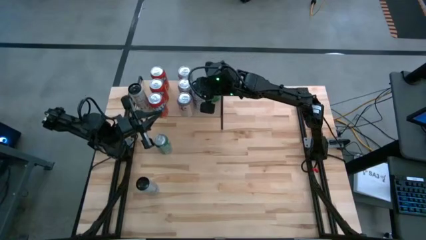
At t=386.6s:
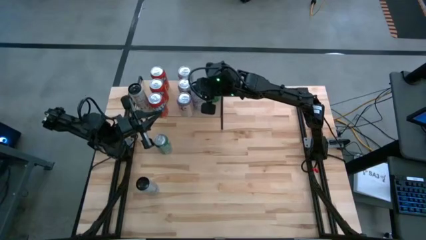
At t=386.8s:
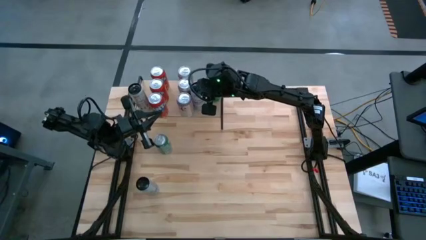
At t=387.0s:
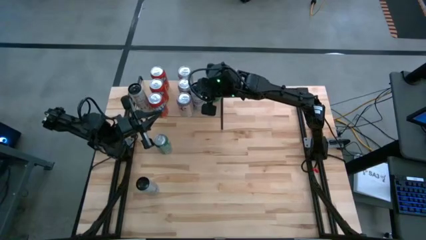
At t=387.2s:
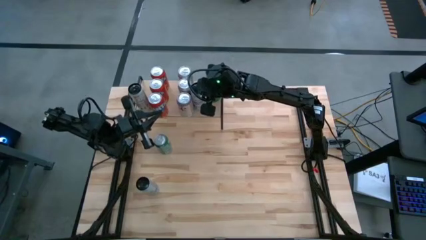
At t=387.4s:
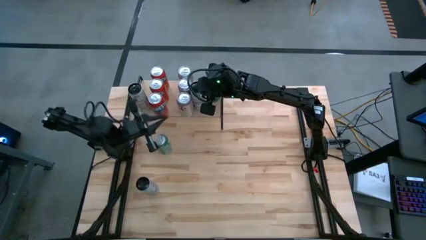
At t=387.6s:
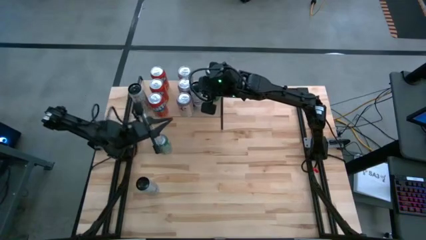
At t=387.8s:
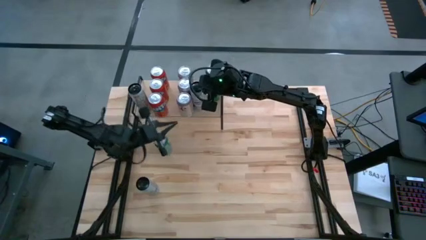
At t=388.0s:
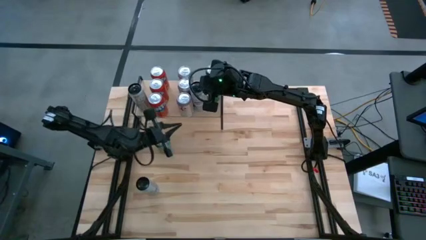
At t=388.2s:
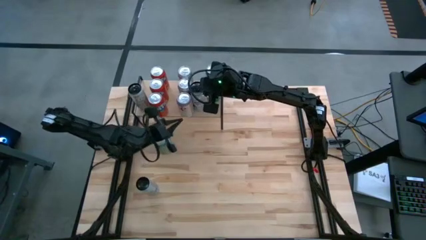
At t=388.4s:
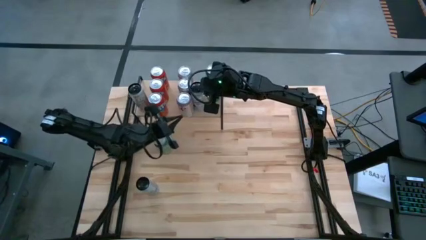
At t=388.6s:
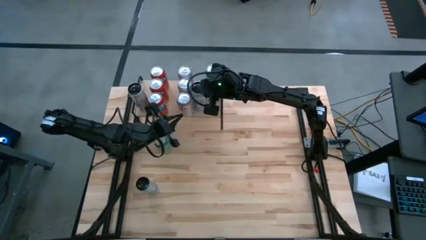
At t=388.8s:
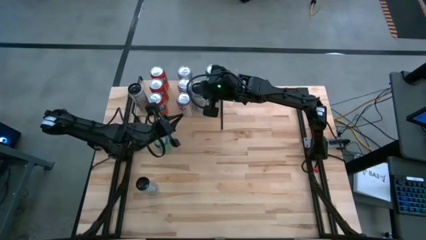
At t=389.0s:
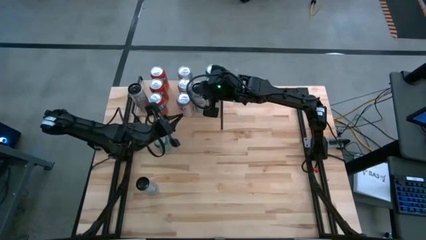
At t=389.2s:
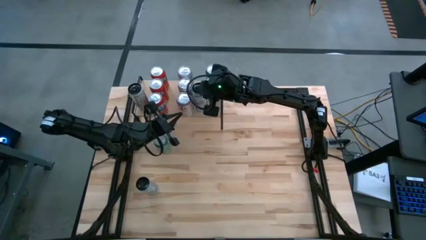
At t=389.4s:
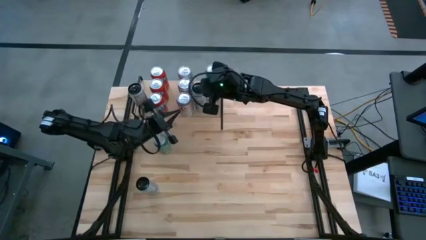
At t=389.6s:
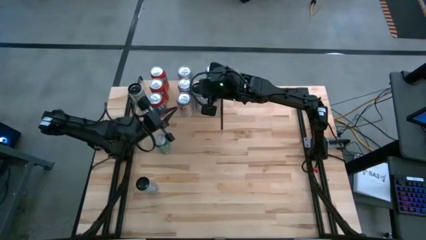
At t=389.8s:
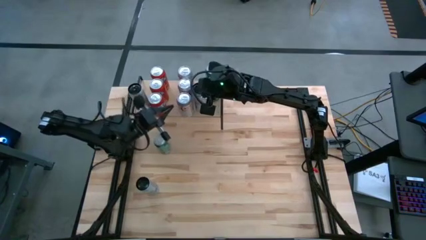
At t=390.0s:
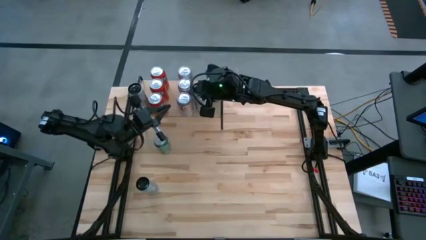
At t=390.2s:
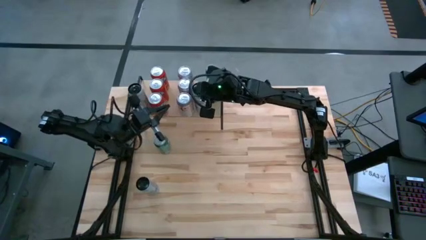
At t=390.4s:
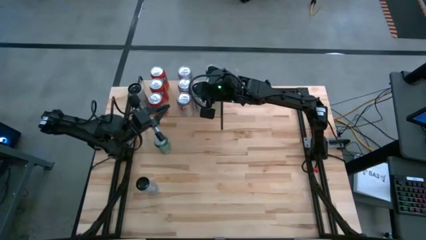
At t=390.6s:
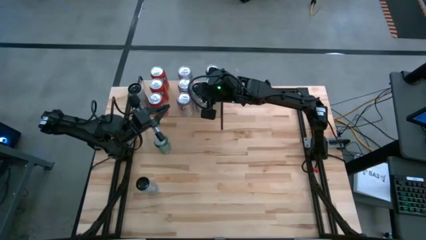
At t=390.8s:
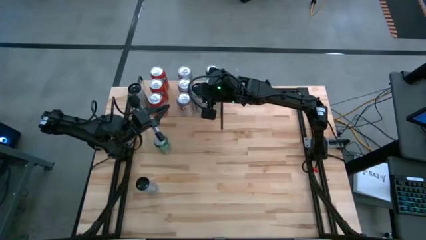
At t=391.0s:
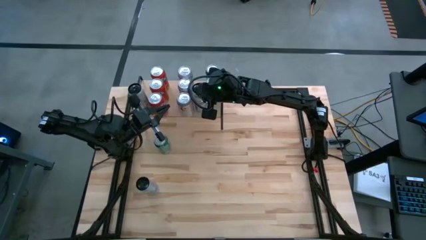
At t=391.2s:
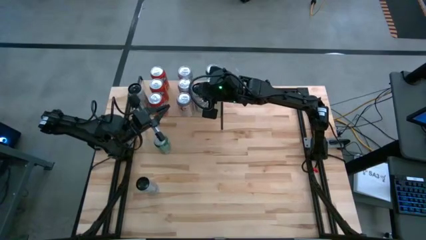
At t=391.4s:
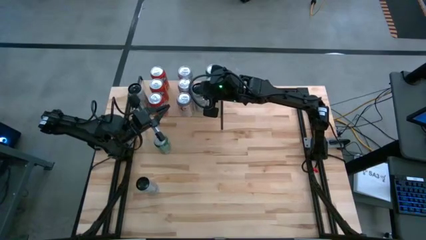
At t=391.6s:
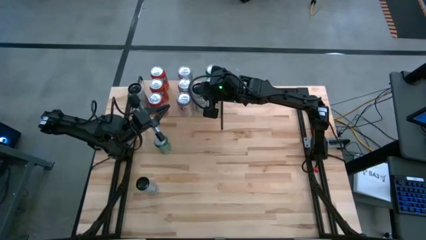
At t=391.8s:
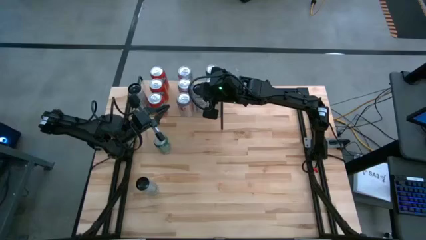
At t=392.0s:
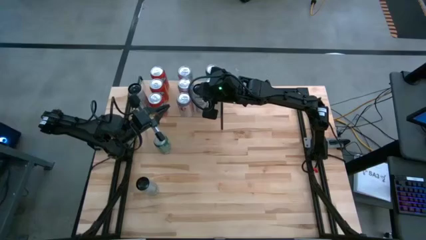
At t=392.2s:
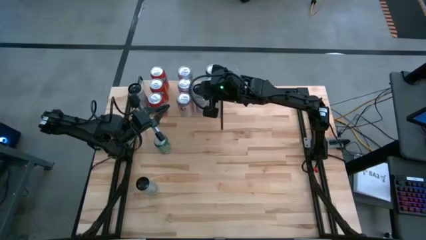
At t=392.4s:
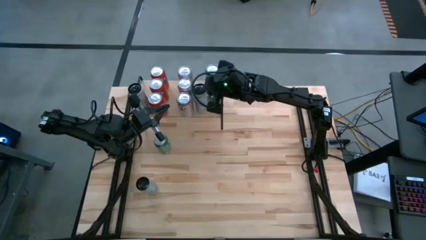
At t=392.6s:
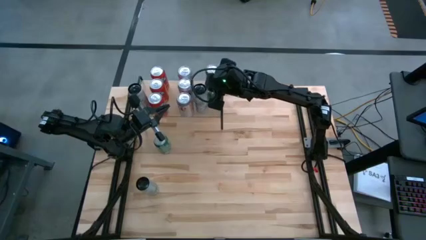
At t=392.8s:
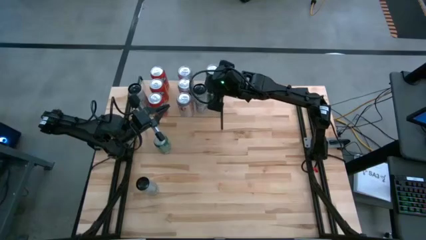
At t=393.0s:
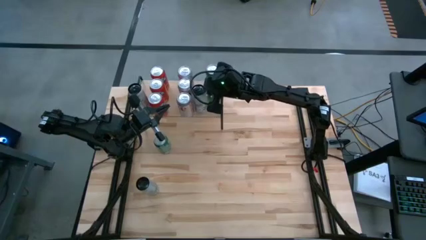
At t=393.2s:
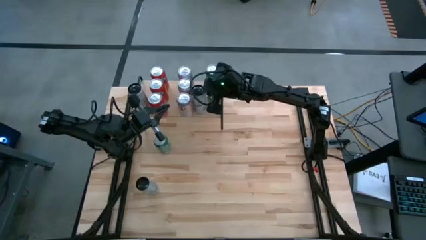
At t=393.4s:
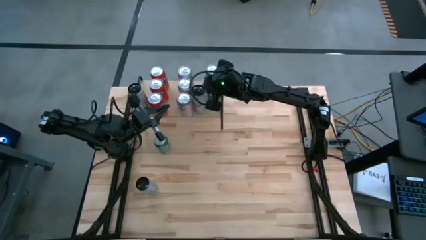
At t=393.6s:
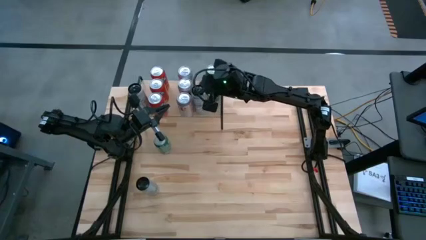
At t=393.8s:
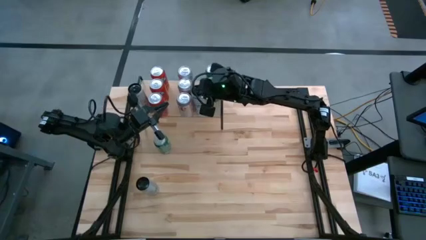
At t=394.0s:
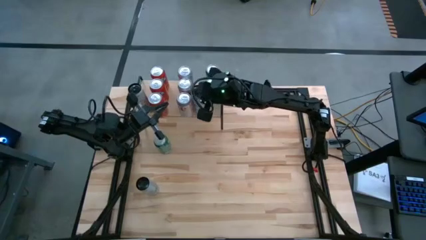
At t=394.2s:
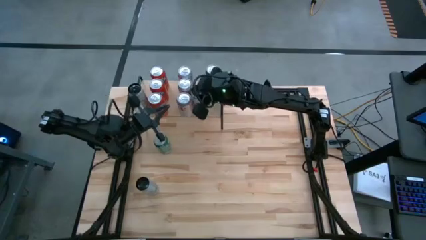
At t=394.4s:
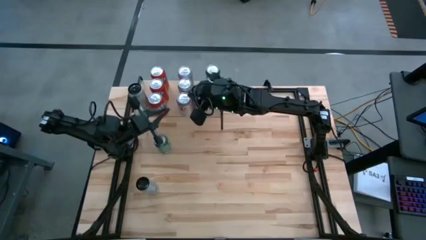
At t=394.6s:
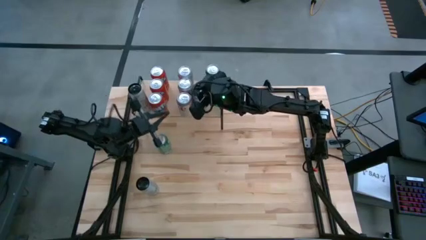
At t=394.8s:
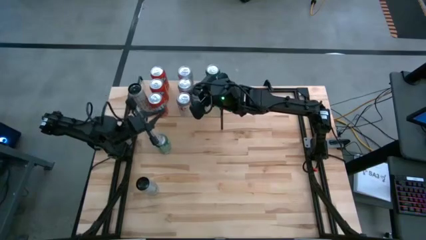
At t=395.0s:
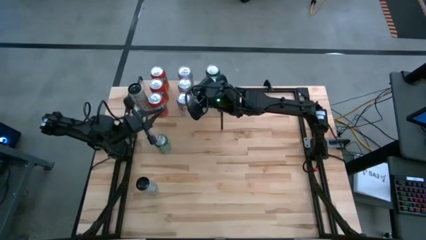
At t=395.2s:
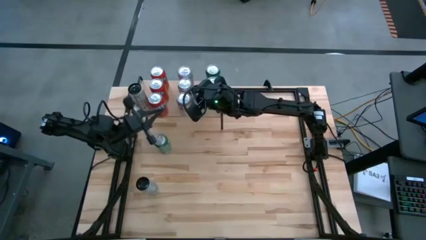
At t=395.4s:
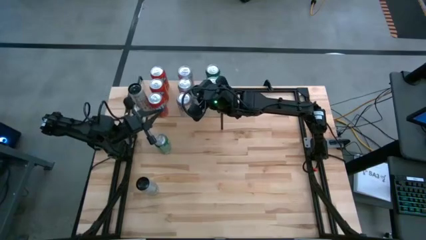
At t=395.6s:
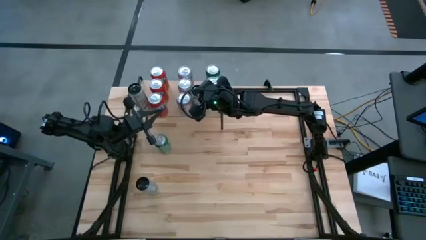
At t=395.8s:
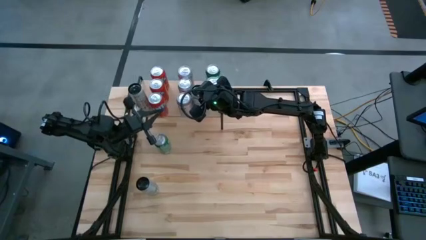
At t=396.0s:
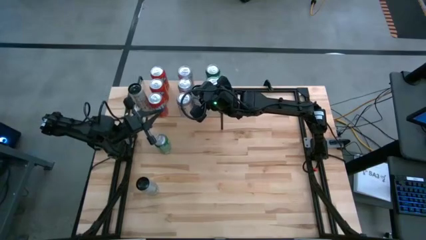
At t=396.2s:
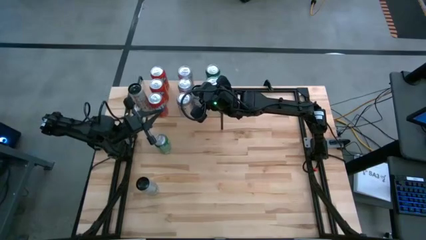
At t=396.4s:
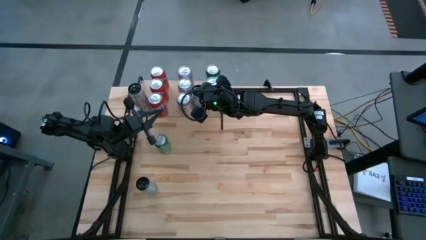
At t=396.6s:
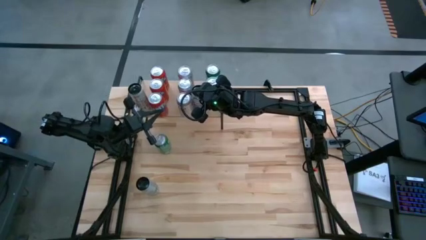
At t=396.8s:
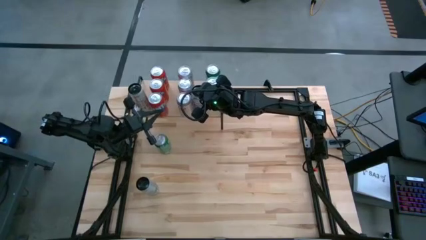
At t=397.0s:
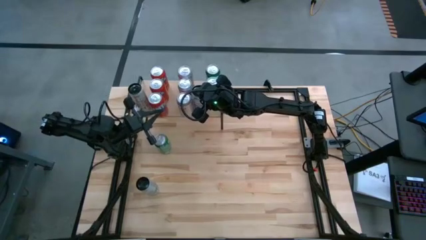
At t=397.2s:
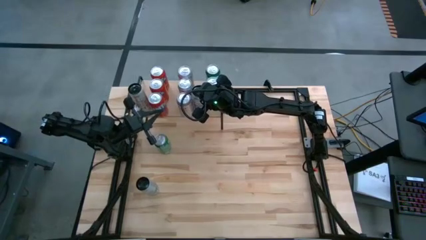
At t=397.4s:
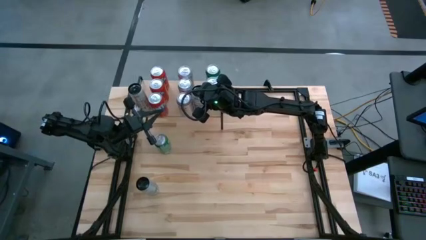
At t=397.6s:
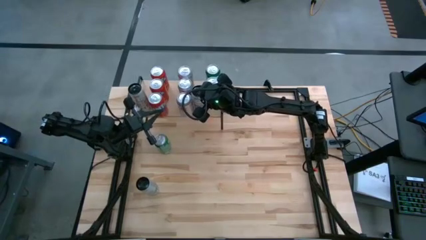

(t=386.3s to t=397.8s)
Task: Place canned beverage on shelf
Adjust the white and blue soda can on the shelf
